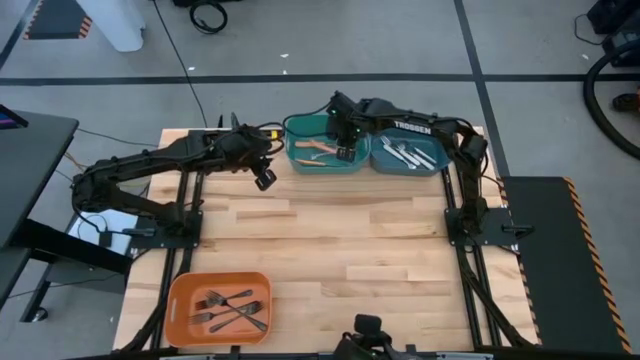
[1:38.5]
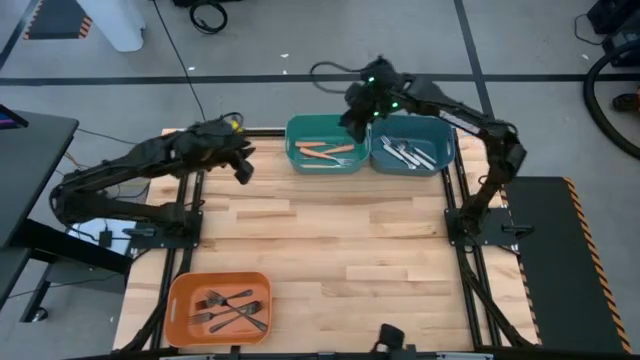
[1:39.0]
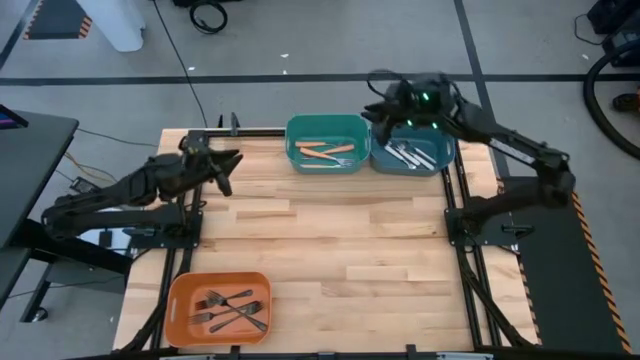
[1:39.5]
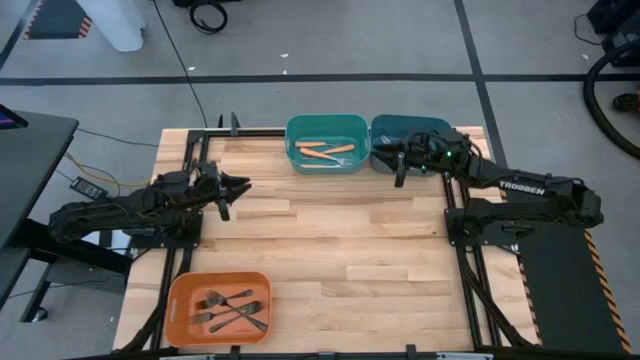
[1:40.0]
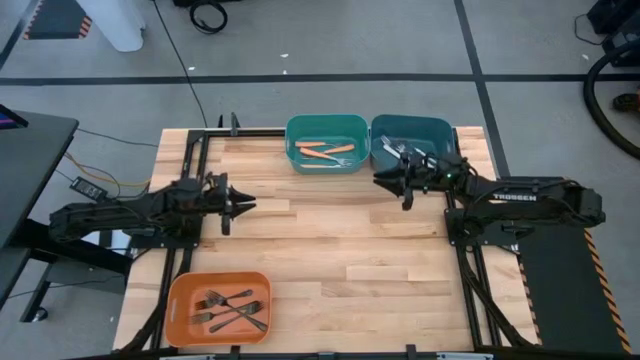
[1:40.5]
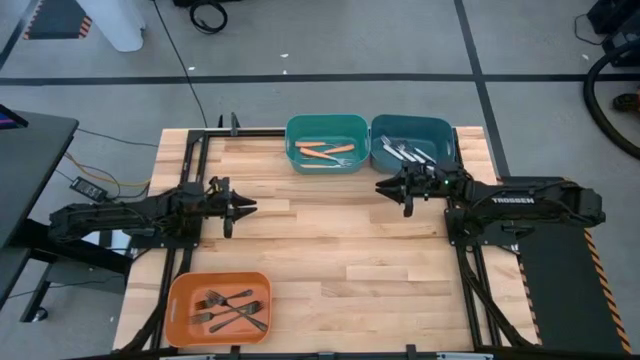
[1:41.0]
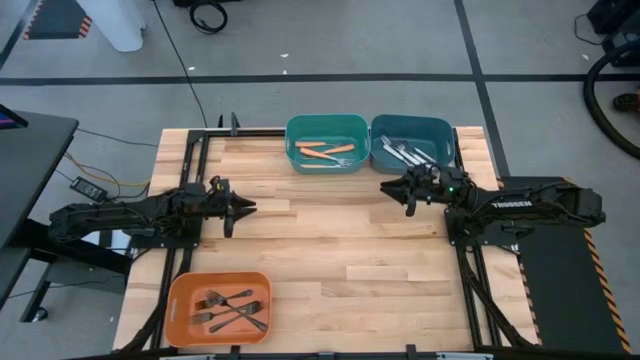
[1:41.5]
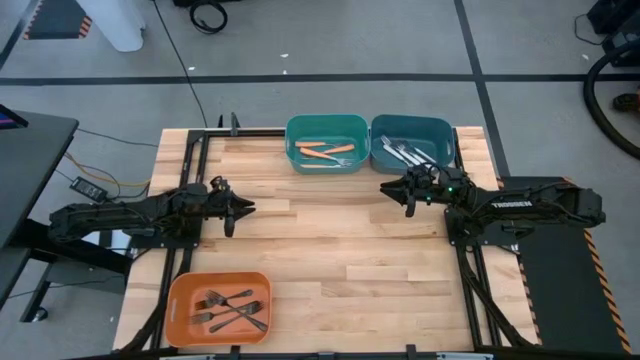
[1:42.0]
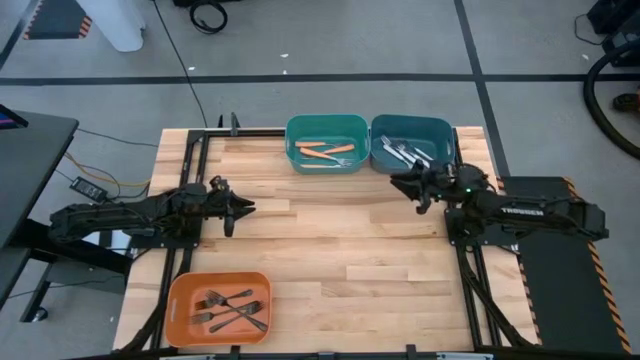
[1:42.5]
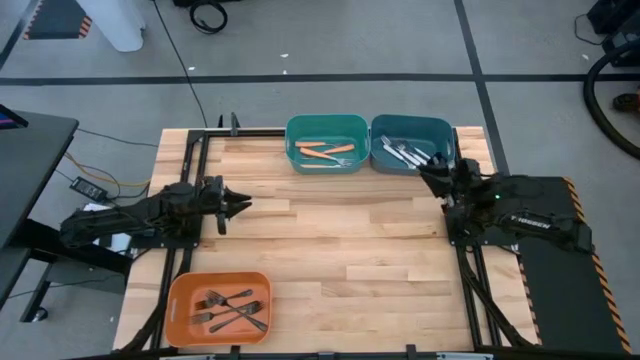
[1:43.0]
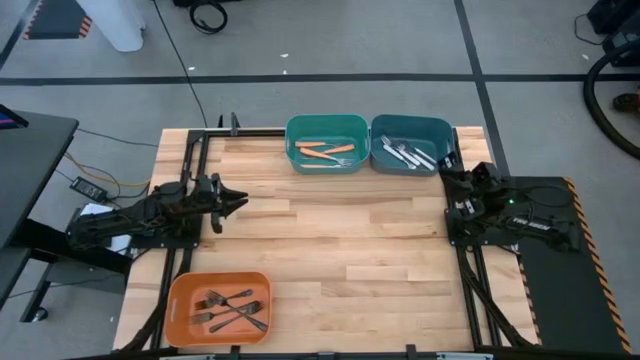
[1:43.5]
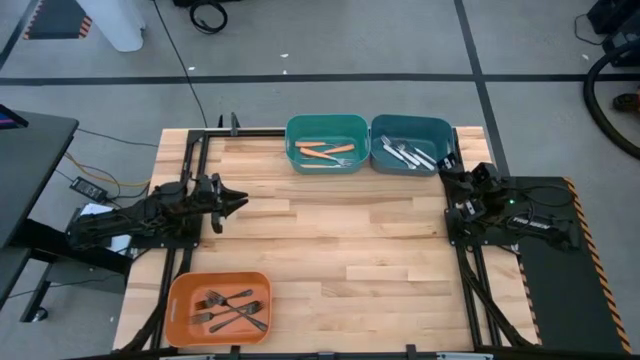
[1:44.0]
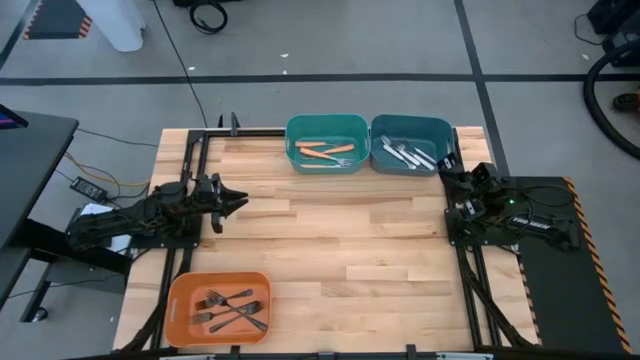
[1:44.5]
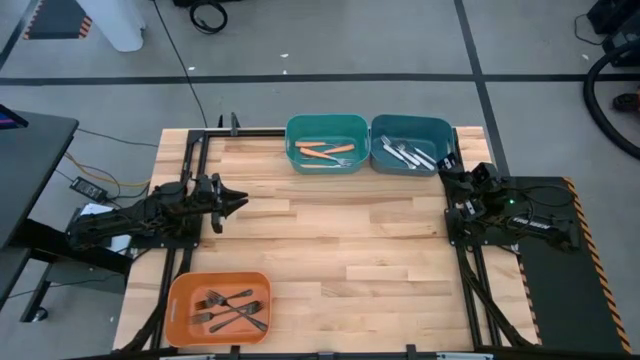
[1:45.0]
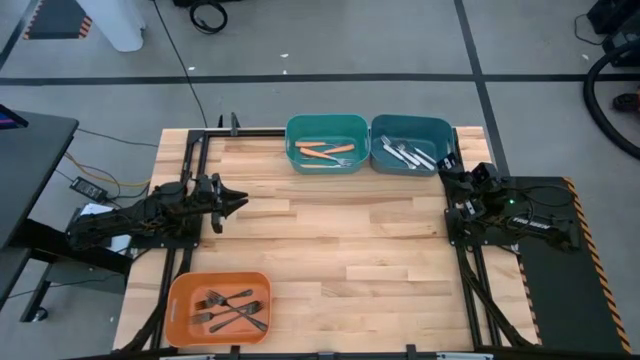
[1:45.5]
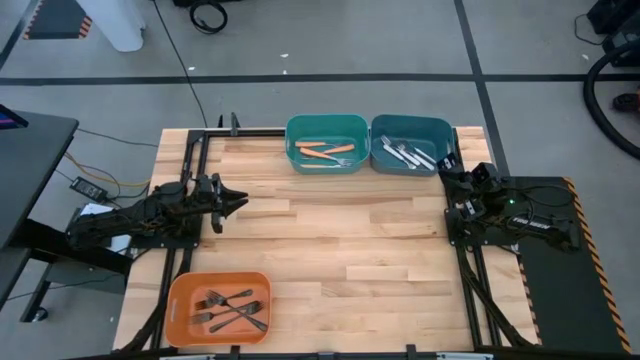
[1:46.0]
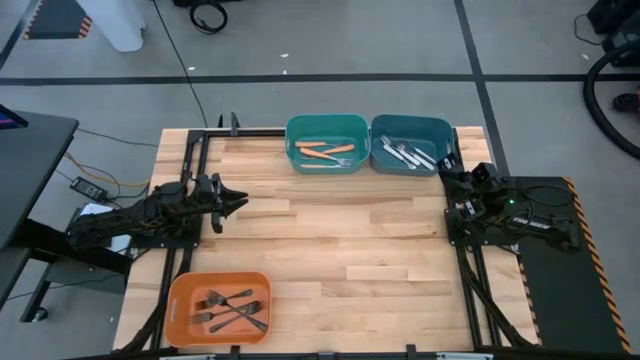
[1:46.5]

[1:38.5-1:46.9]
Task: Sort silverware by color (type)
Return to Home Position

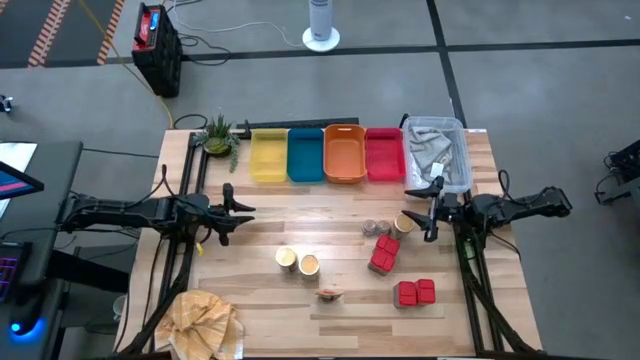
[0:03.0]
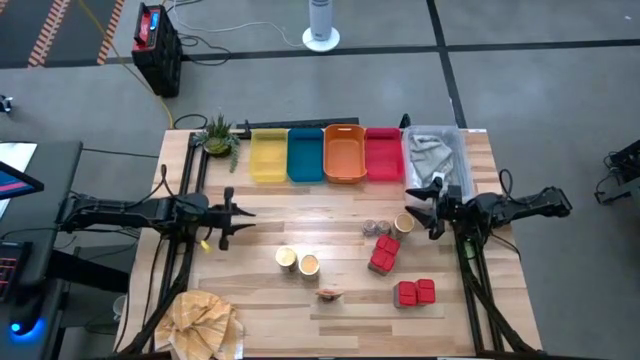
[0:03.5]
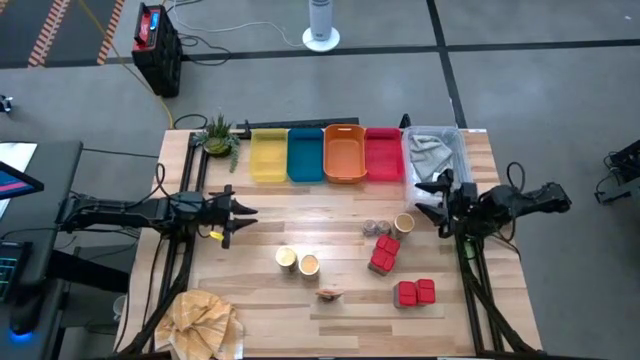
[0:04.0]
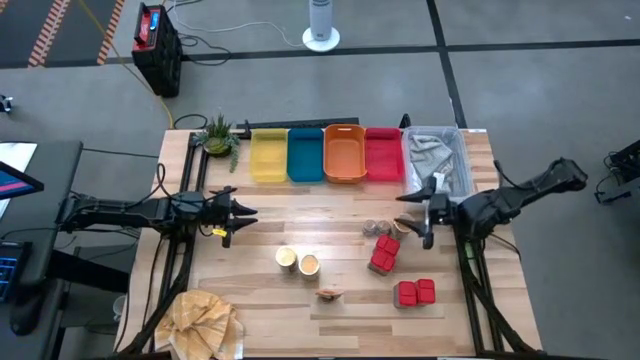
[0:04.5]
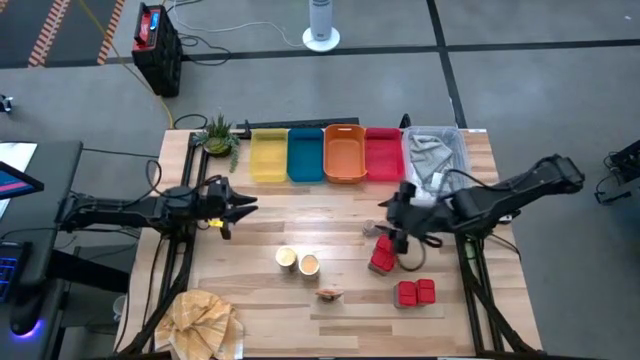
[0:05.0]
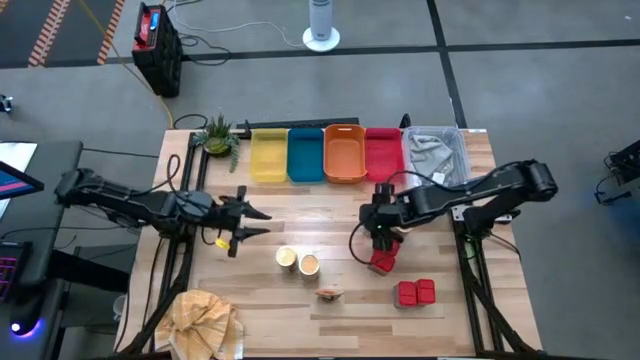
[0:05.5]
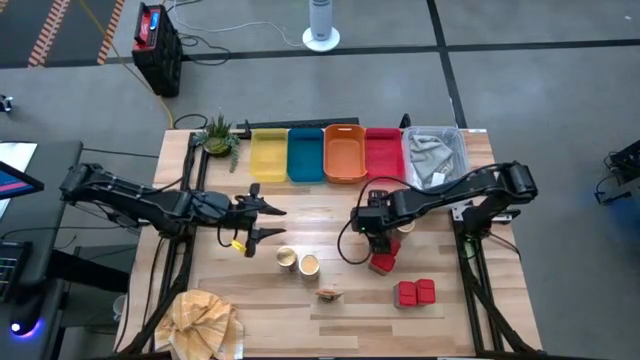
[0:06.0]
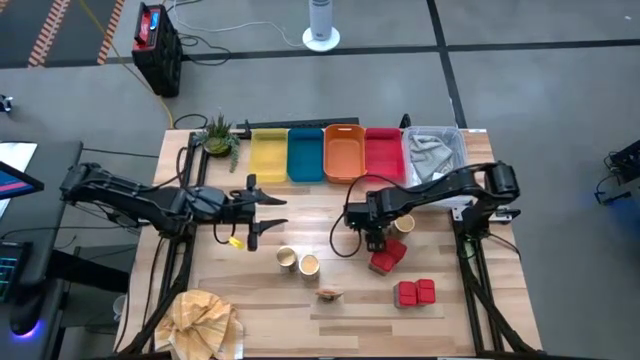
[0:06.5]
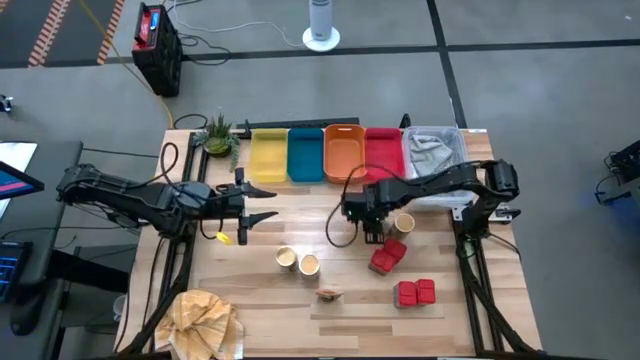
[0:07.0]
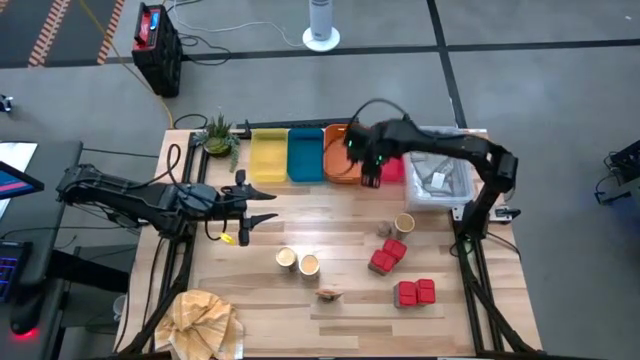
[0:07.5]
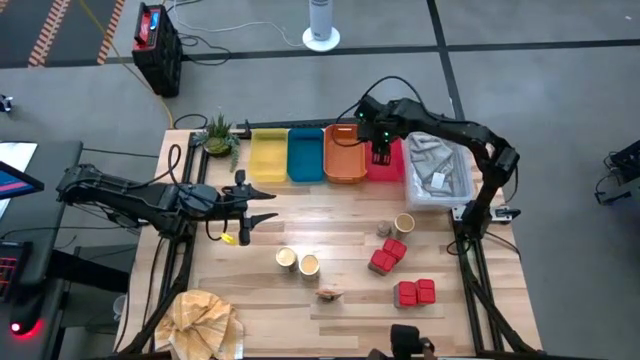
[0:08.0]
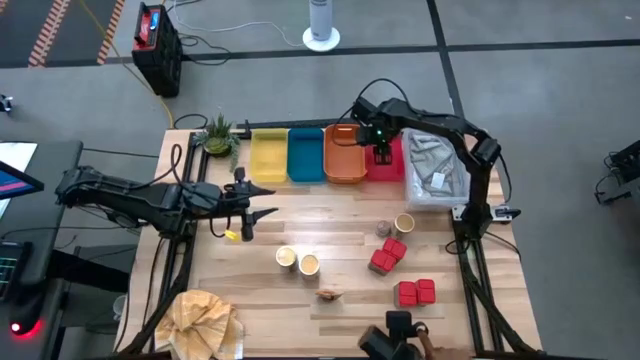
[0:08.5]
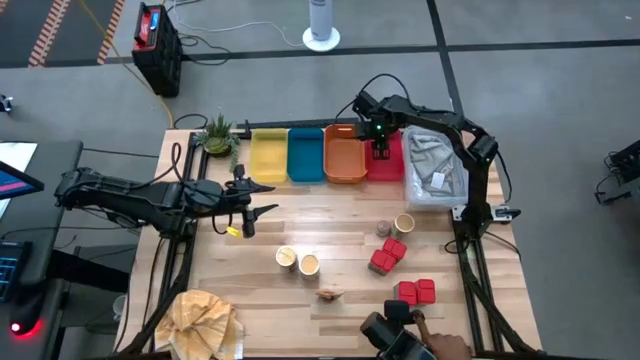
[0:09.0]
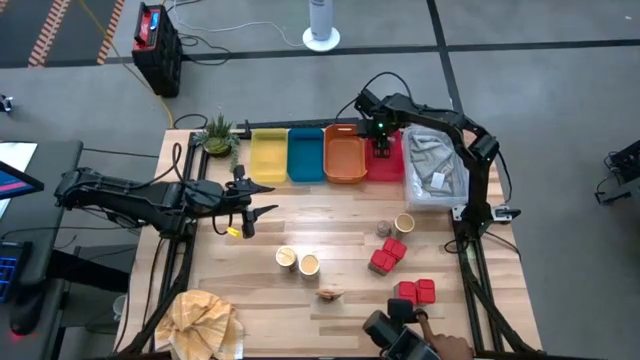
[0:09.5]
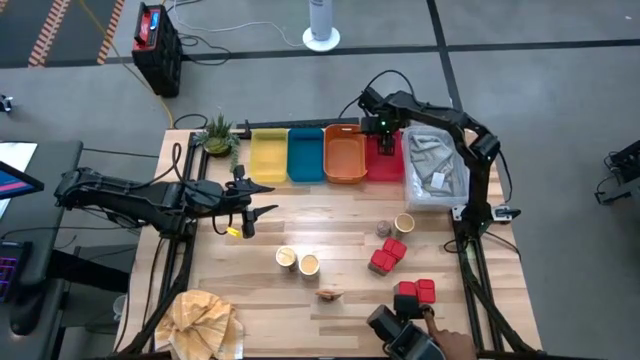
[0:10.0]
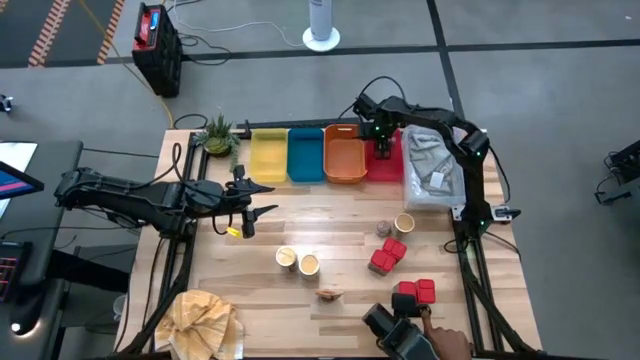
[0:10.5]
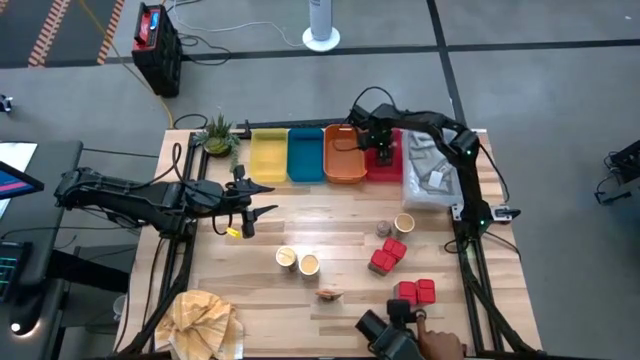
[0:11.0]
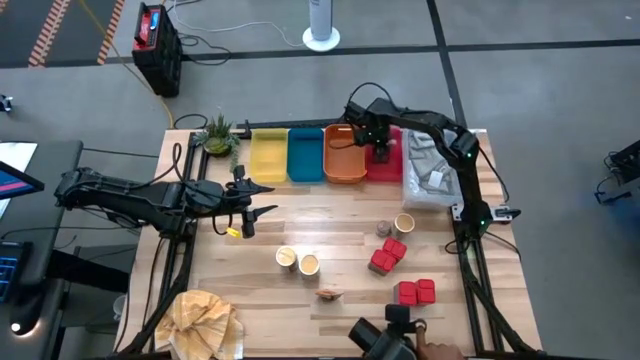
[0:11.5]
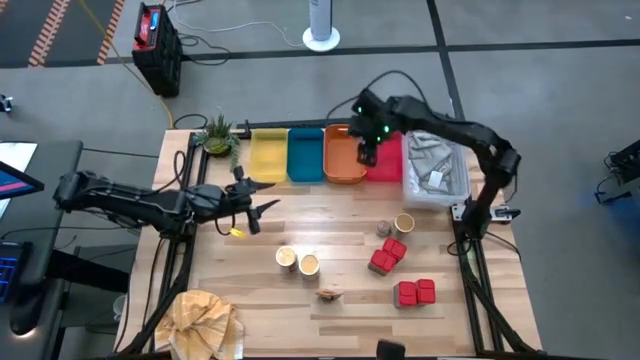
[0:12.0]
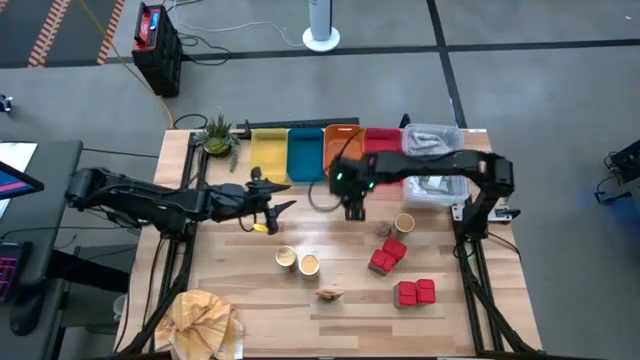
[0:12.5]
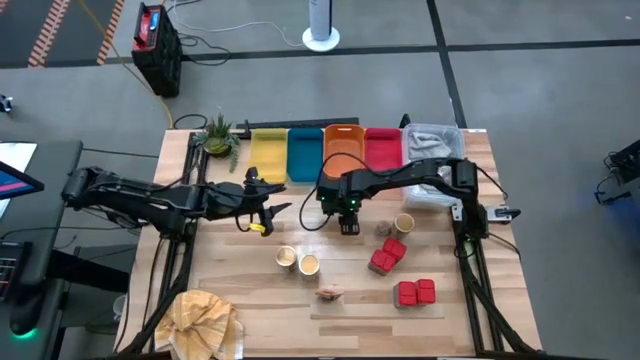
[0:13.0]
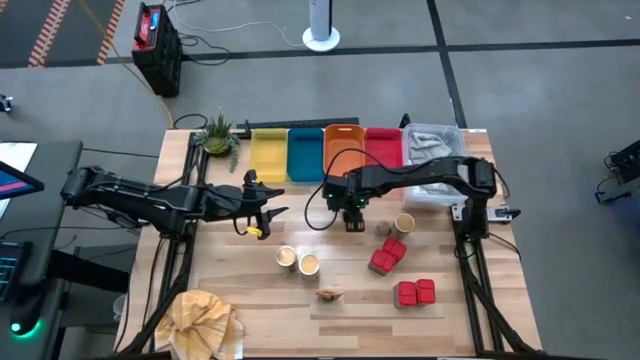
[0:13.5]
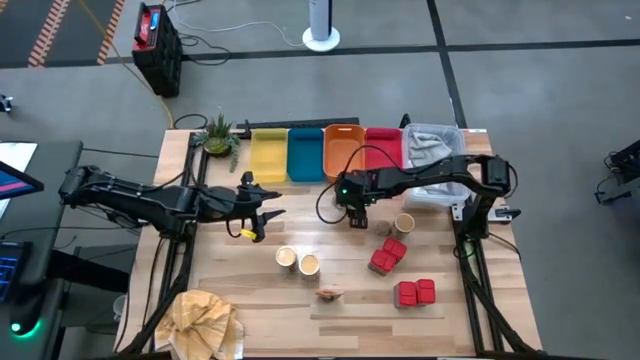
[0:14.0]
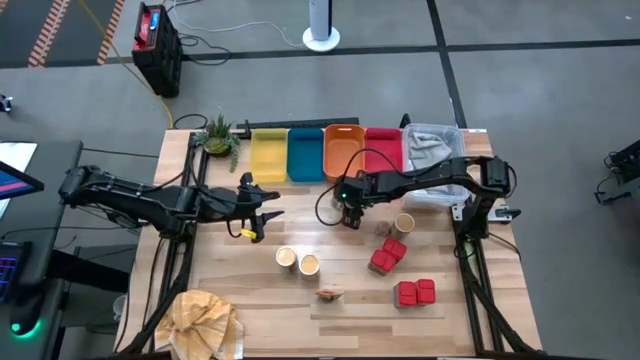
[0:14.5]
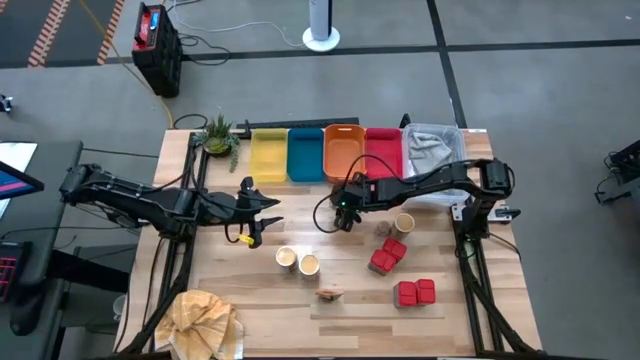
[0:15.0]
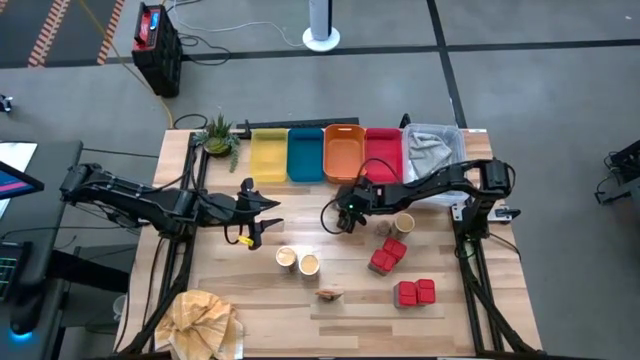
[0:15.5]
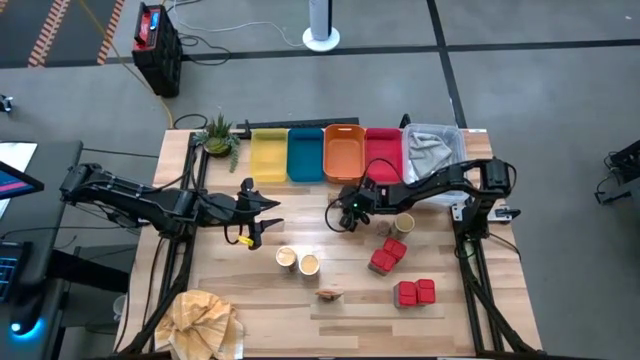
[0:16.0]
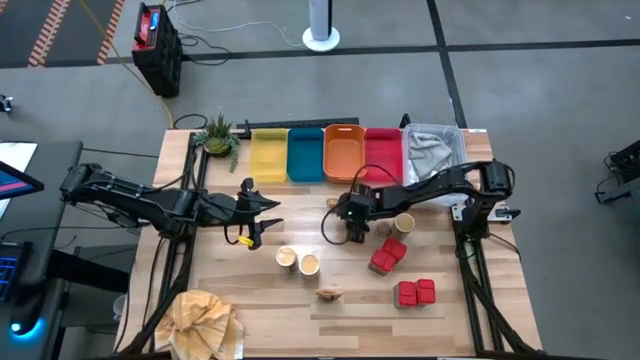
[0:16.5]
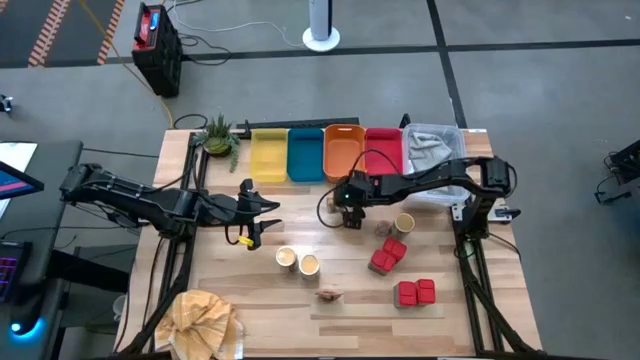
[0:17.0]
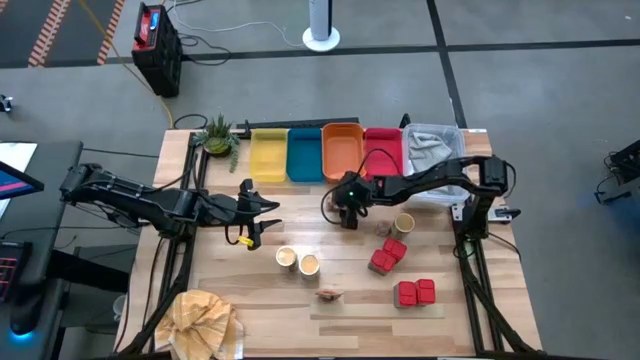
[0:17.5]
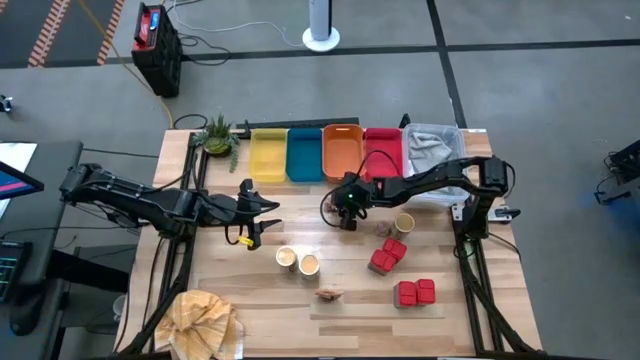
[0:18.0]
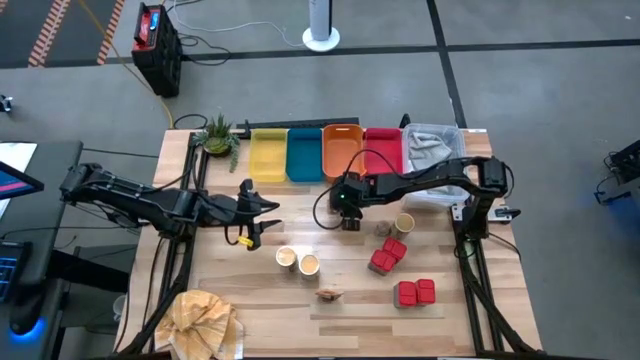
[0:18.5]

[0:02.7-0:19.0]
Task: Sort spices by type
Put the left brown spice bottle into the red bin
